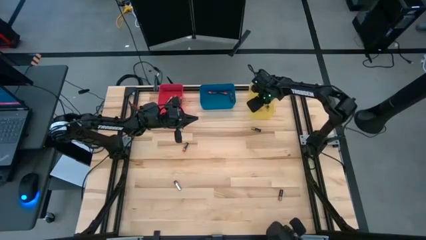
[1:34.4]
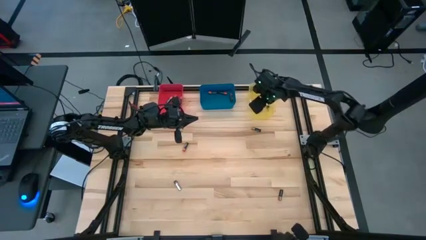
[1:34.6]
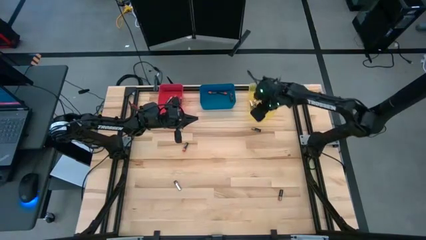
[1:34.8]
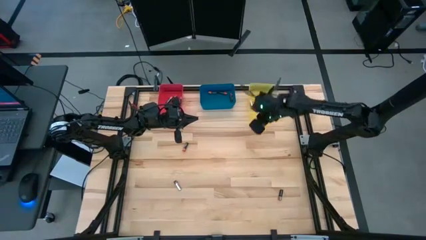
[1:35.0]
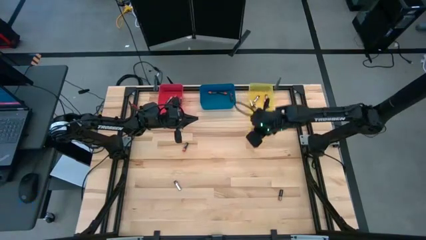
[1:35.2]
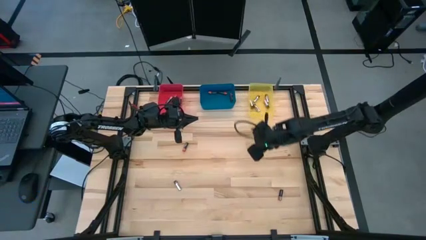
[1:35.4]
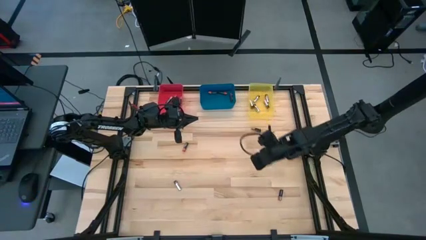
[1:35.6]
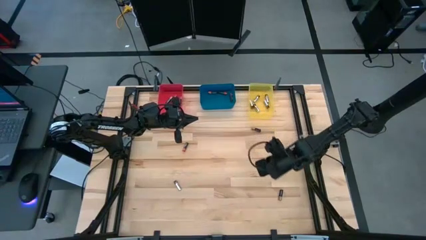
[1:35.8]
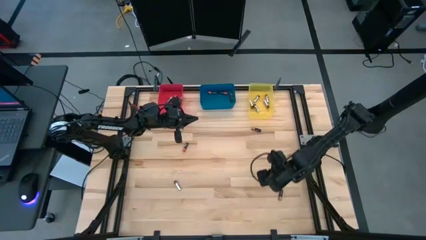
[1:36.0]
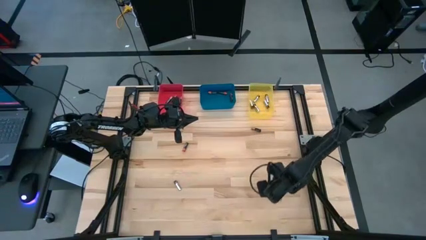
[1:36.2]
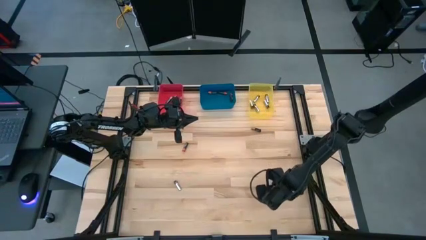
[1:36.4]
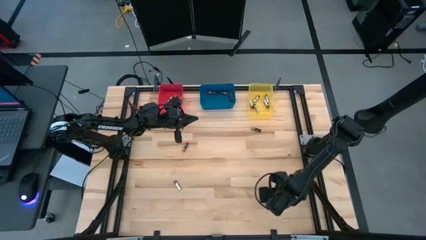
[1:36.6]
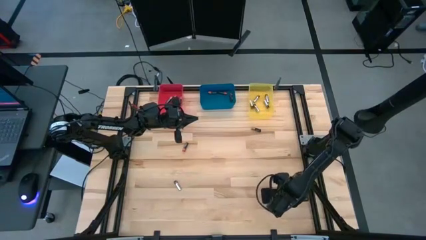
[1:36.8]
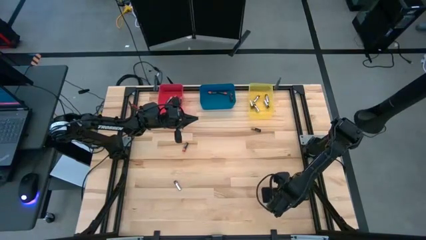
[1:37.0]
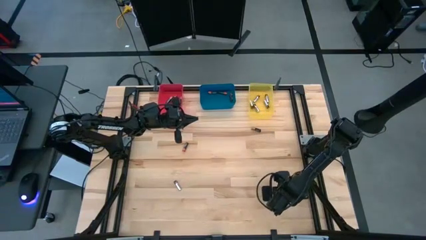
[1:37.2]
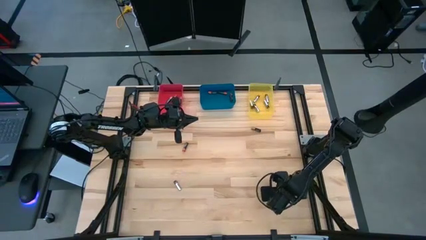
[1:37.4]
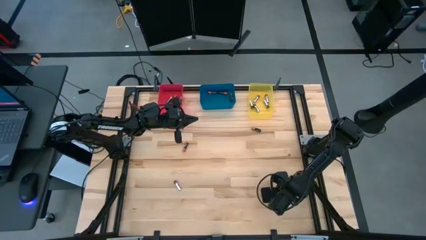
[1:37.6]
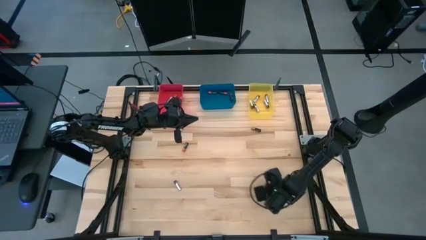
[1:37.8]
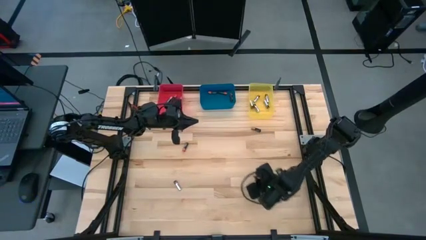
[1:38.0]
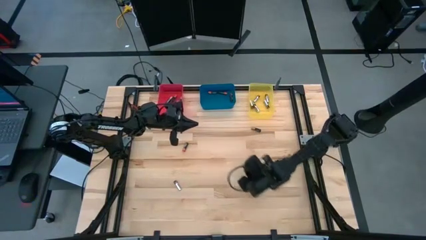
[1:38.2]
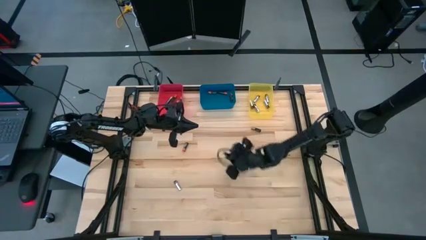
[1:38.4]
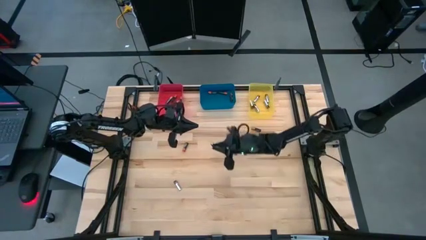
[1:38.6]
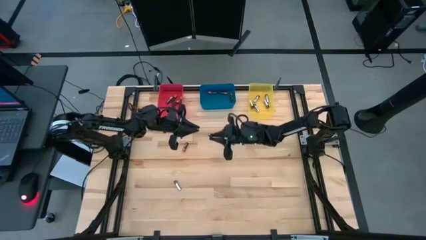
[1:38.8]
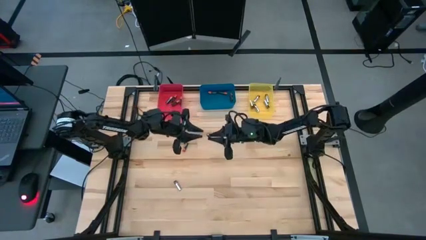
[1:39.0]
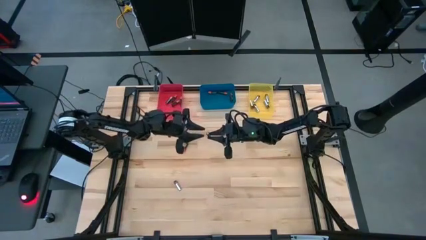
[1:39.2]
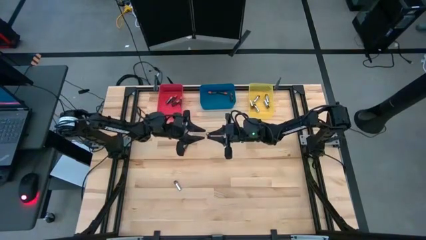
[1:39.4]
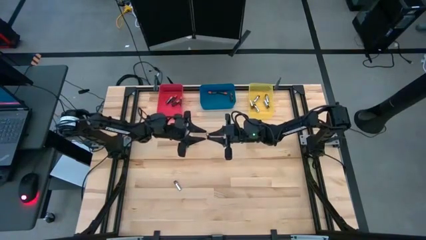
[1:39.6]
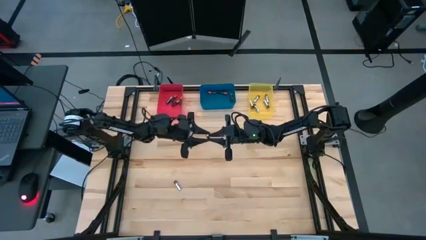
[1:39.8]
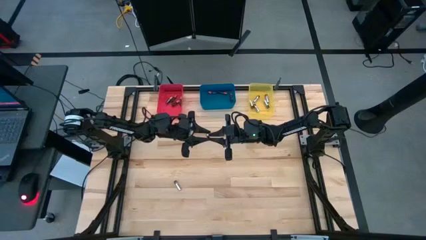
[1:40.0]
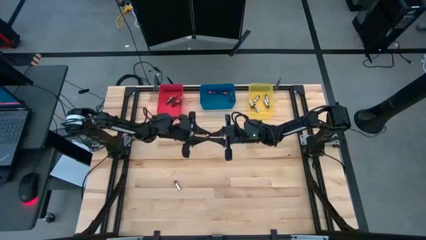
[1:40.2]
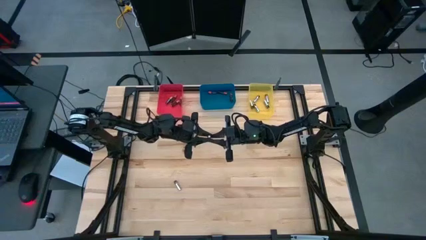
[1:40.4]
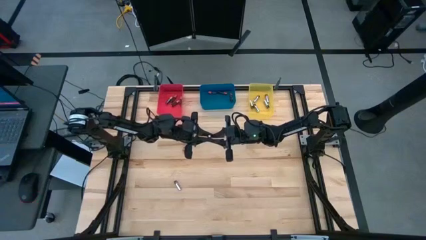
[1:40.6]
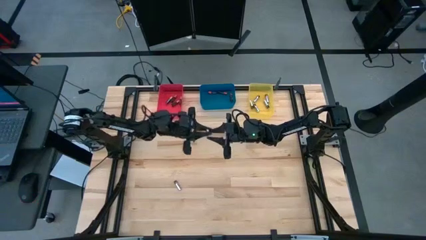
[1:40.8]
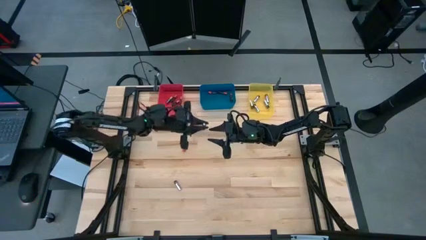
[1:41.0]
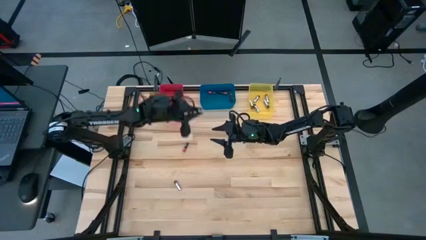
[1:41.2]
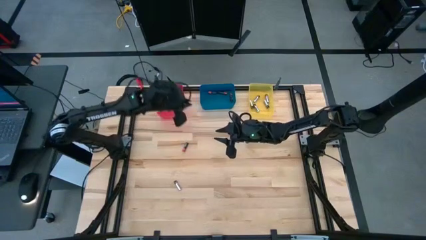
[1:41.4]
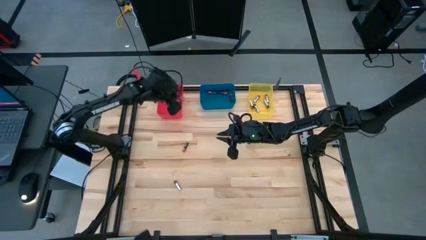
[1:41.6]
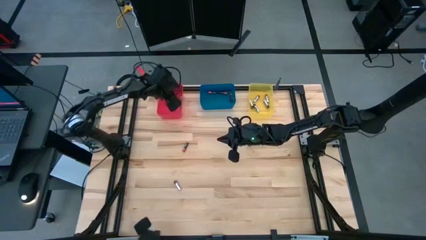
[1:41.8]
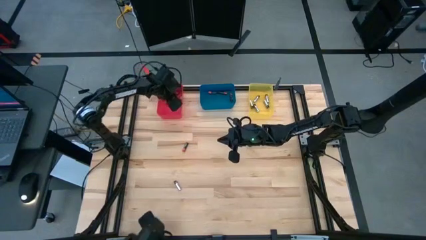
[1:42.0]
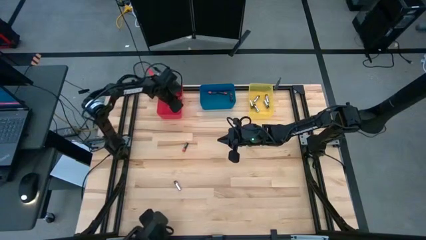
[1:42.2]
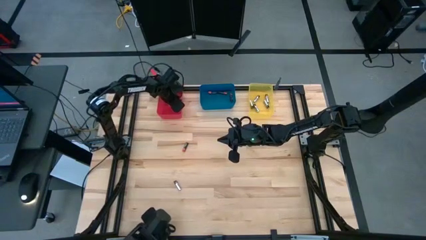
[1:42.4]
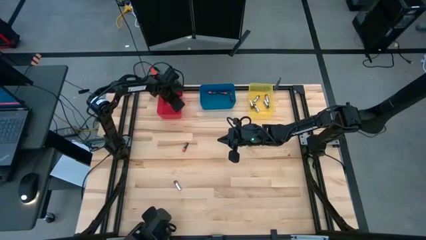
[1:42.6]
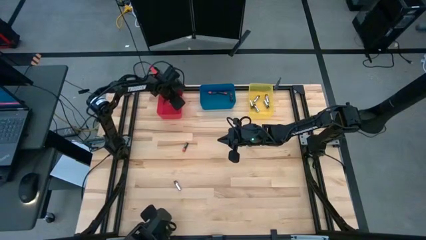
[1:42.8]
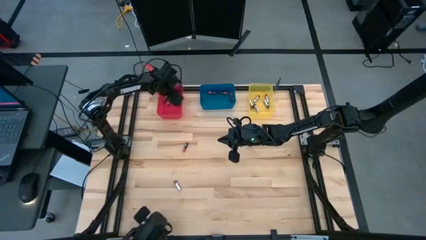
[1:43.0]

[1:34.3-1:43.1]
Task: Sort batteries
Put the brown battery into the red bin

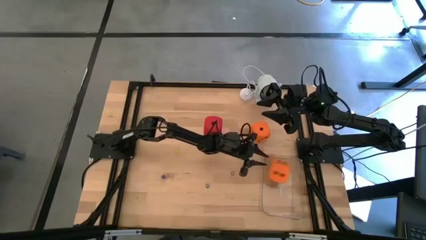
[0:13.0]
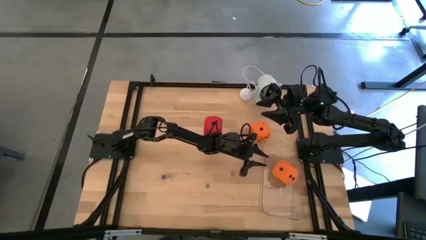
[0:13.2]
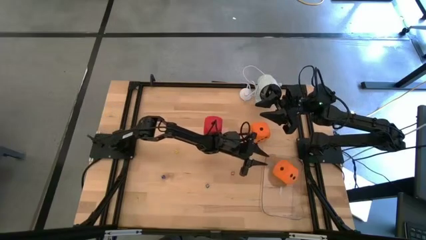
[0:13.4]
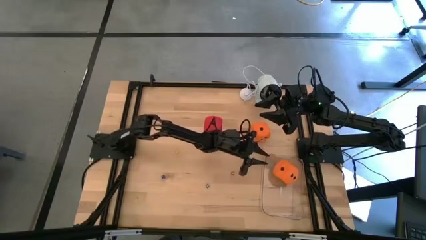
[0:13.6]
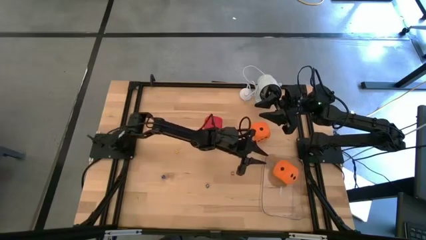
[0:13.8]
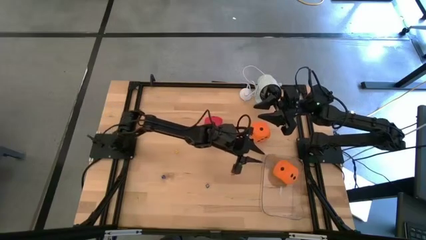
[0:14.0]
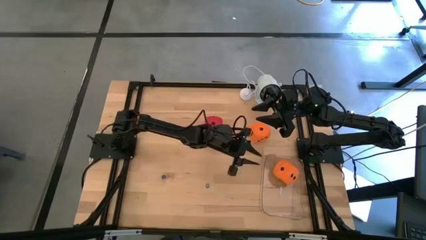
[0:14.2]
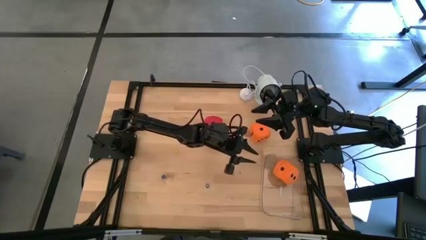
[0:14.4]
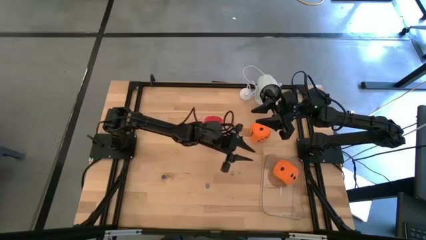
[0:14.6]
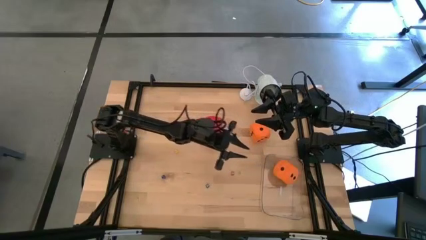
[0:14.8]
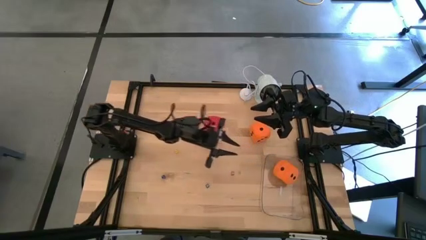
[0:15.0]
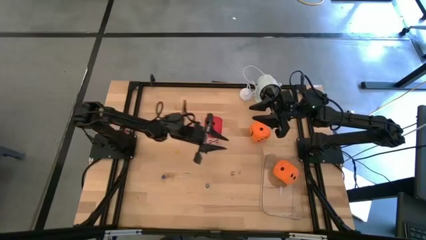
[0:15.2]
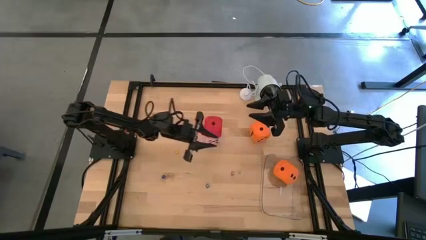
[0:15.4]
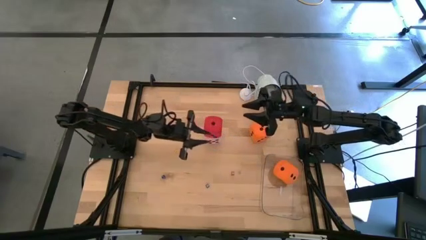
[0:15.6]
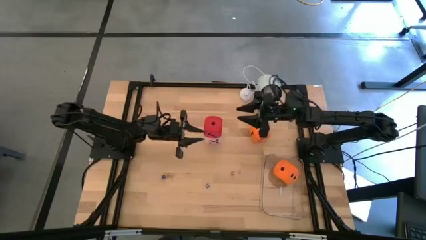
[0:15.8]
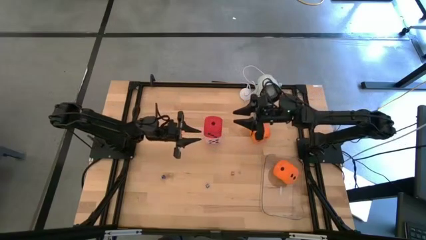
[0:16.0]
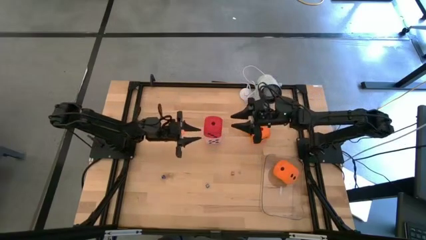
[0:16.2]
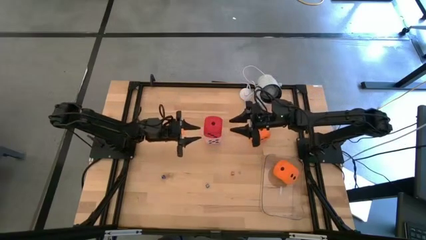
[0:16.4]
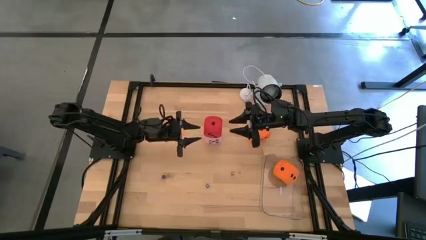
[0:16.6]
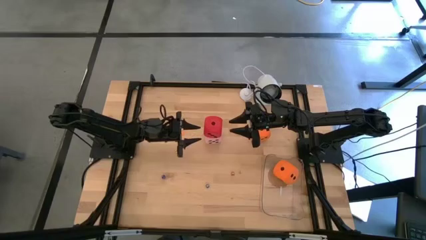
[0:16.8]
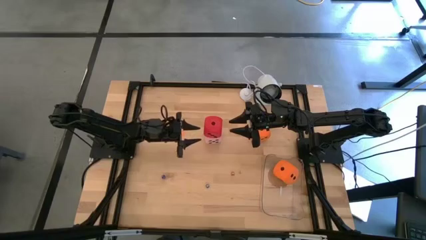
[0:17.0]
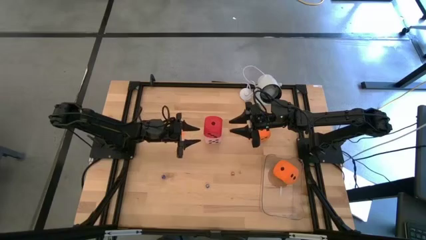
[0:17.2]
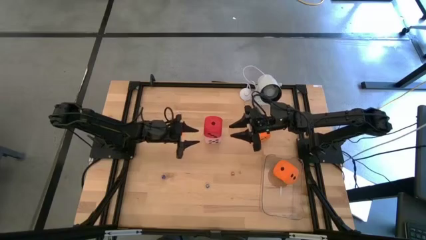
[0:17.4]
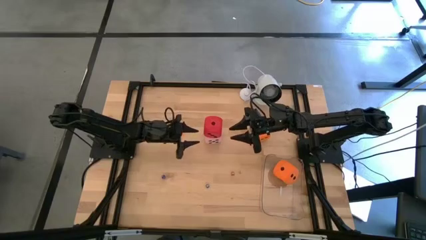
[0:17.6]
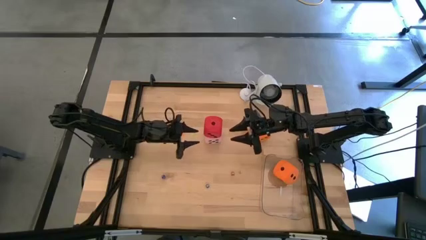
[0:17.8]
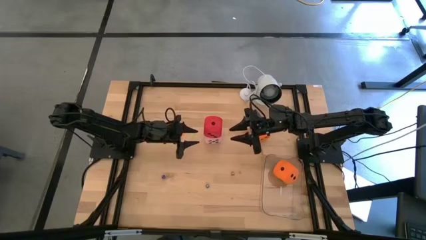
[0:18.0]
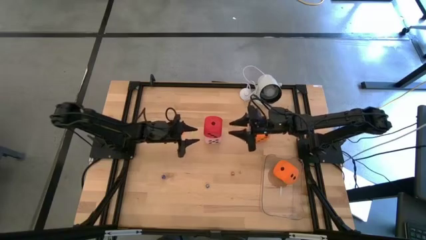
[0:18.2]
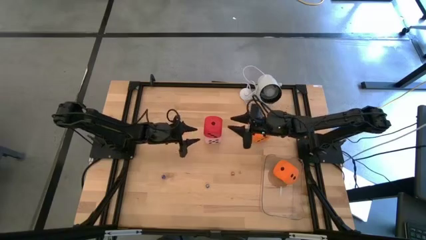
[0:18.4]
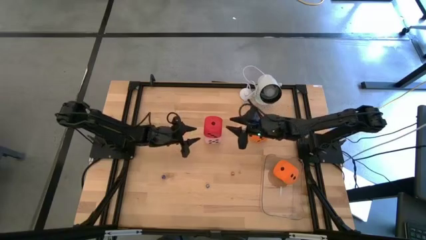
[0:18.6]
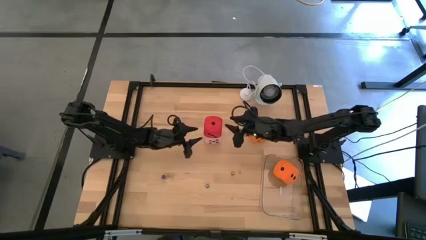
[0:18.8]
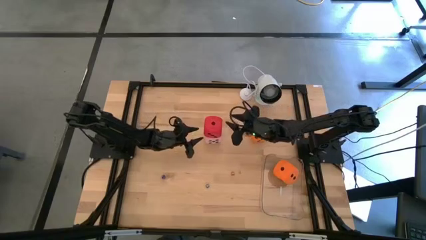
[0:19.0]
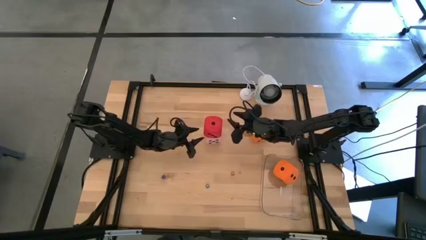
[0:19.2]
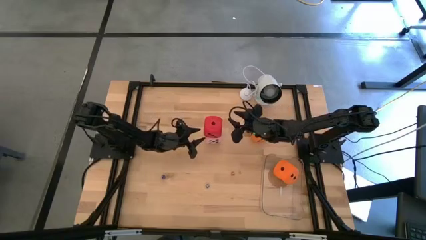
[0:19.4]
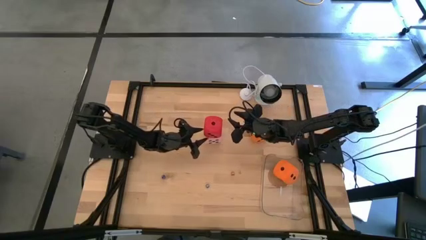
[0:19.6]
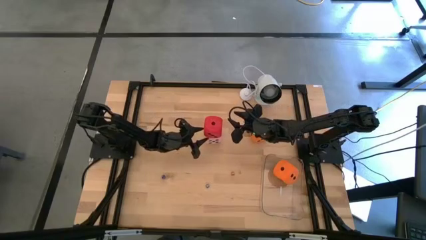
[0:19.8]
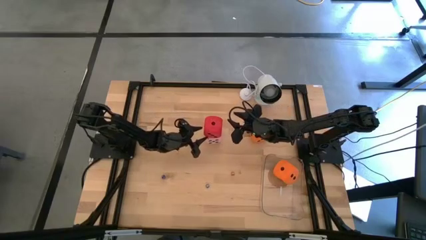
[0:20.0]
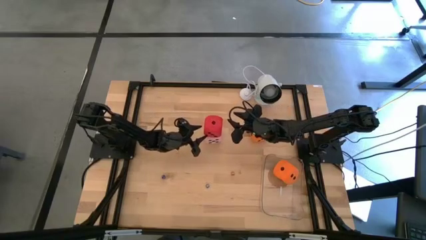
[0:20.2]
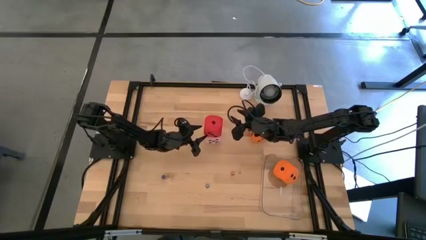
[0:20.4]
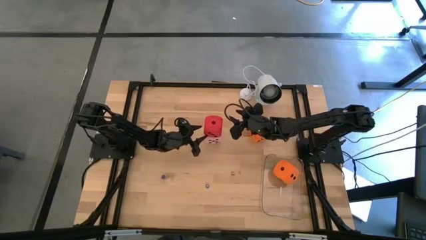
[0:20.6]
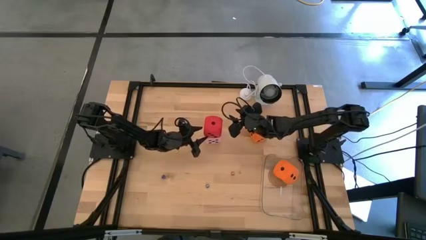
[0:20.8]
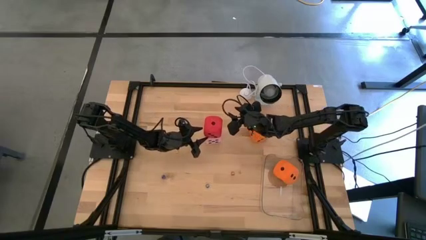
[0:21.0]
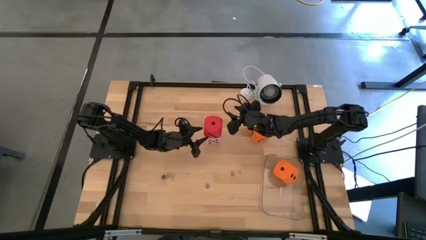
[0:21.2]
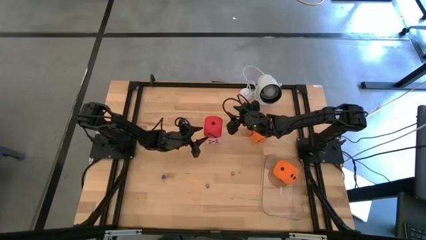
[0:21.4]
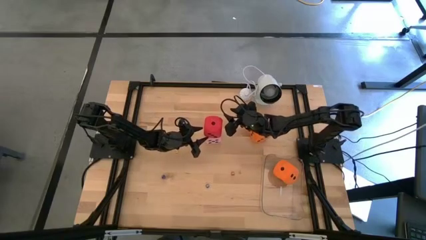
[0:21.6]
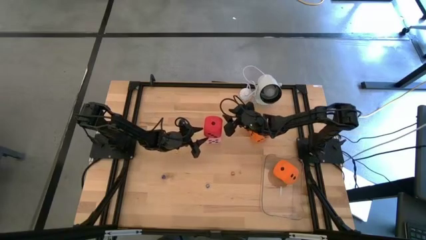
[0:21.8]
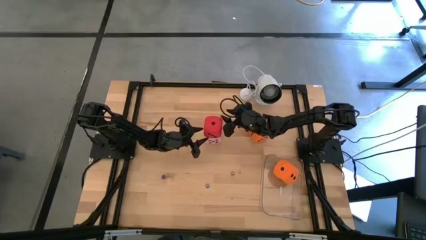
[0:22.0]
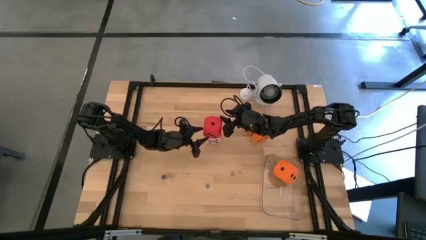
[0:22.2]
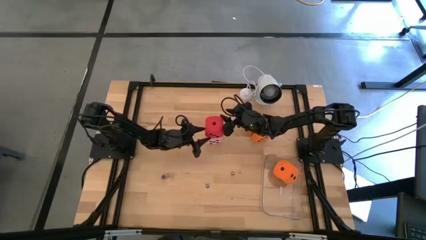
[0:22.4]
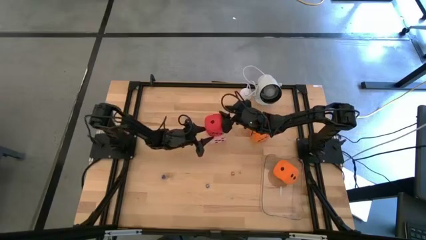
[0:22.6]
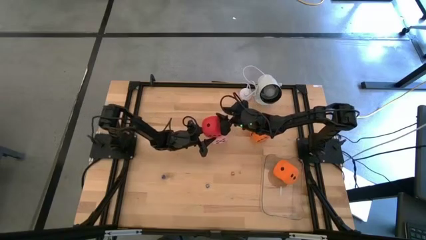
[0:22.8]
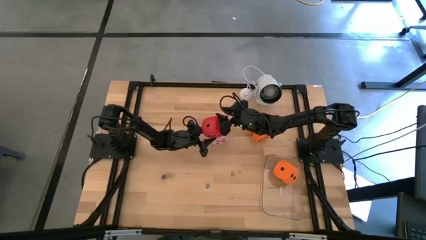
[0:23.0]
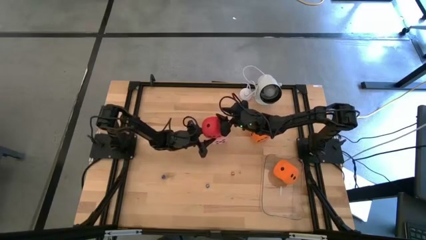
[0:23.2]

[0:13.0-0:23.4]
Task: Pick & Place Dice
Put the large red die into the transparent container
